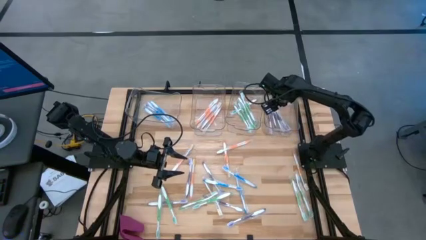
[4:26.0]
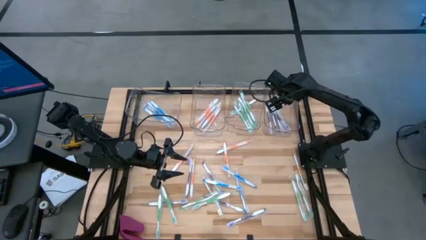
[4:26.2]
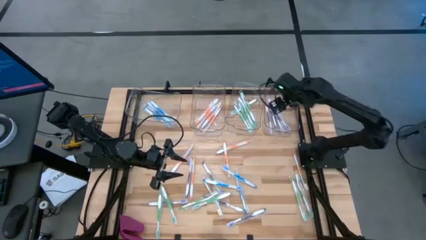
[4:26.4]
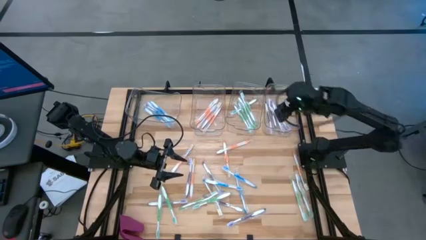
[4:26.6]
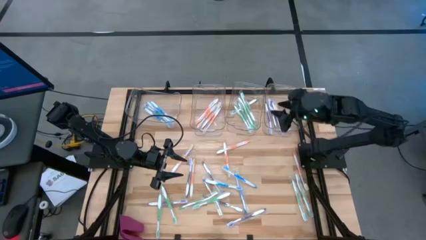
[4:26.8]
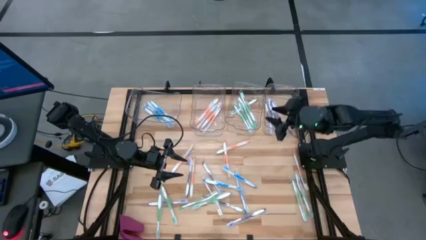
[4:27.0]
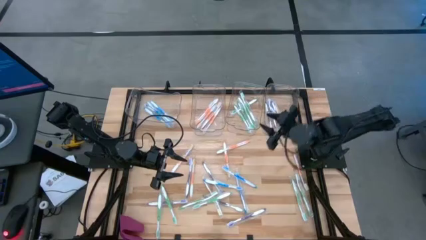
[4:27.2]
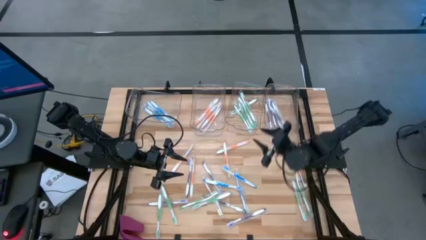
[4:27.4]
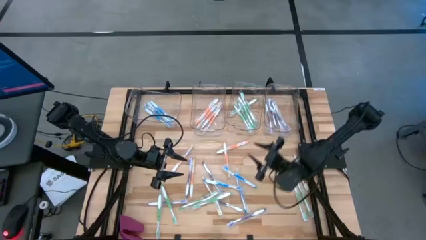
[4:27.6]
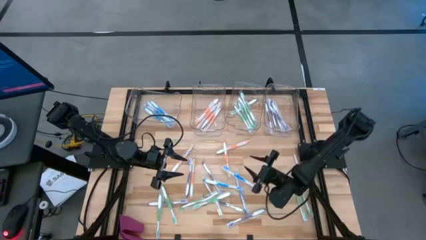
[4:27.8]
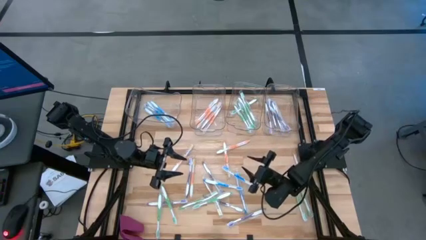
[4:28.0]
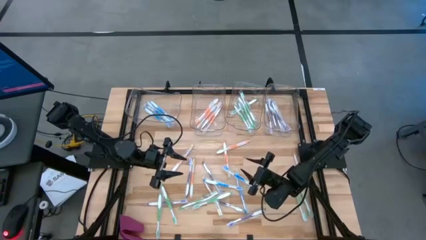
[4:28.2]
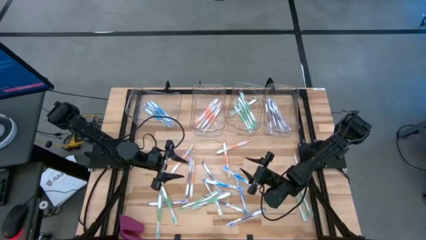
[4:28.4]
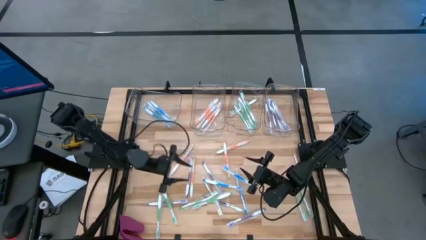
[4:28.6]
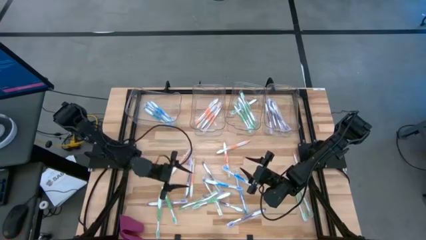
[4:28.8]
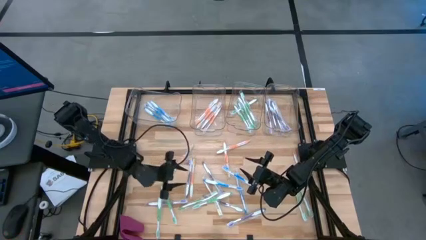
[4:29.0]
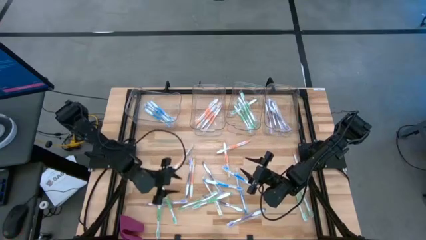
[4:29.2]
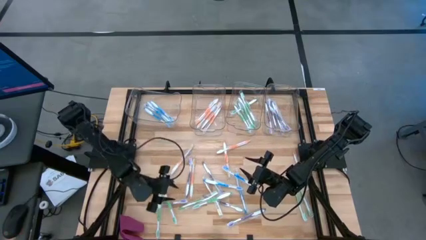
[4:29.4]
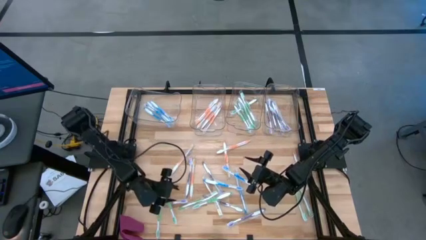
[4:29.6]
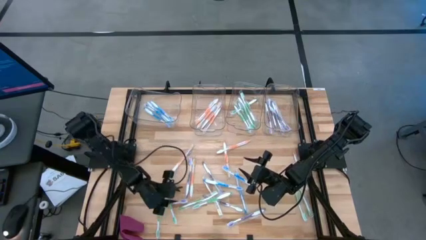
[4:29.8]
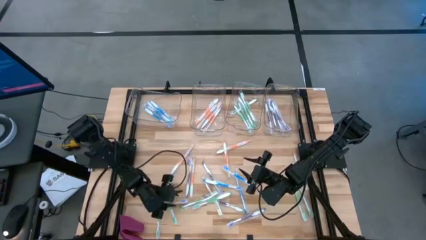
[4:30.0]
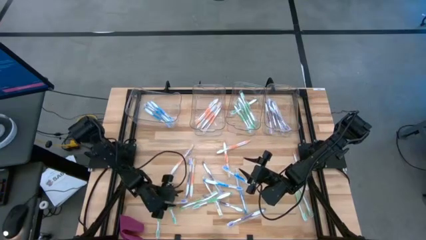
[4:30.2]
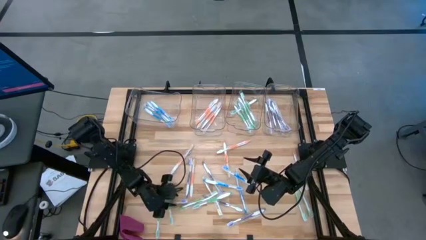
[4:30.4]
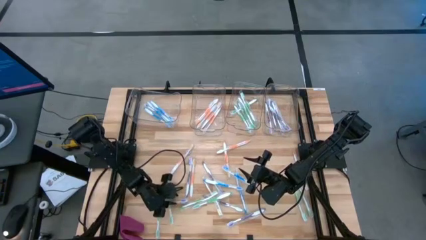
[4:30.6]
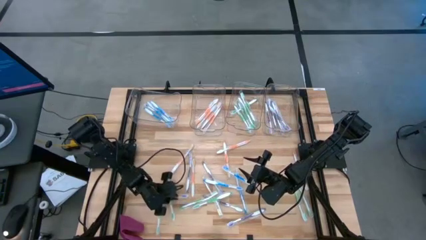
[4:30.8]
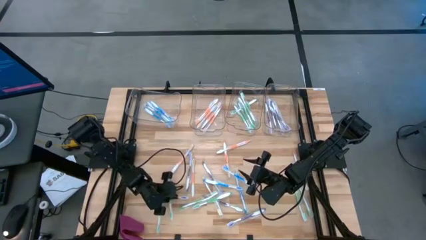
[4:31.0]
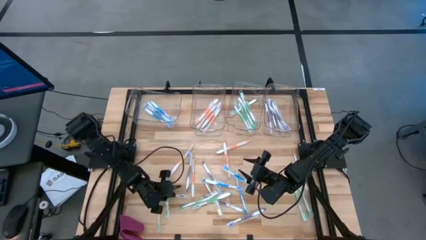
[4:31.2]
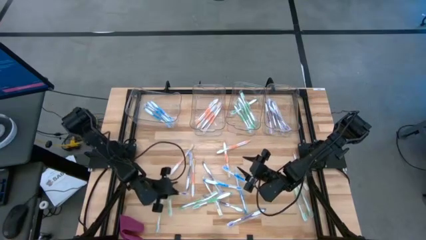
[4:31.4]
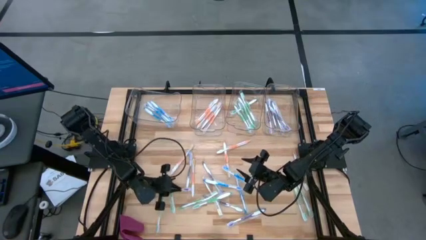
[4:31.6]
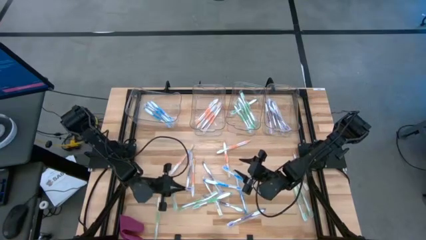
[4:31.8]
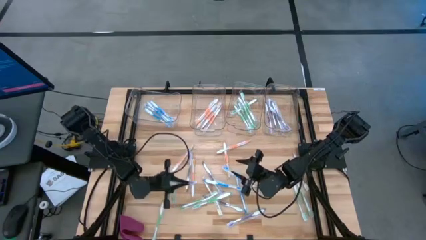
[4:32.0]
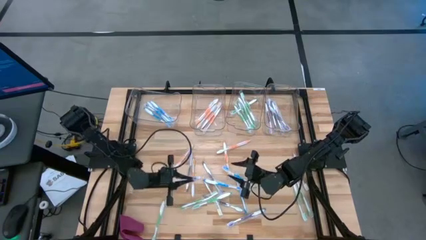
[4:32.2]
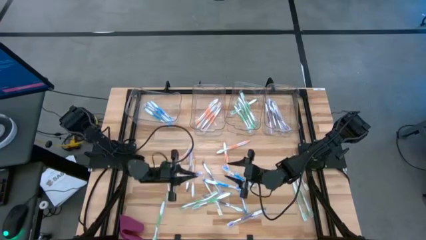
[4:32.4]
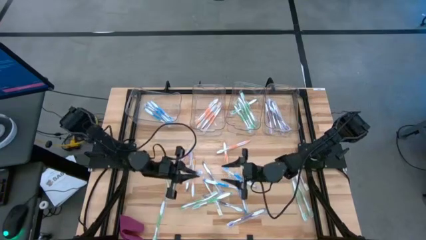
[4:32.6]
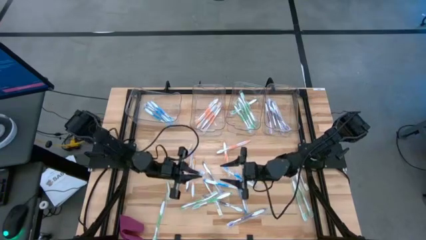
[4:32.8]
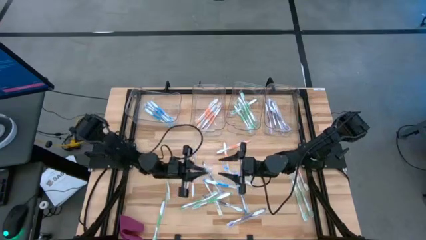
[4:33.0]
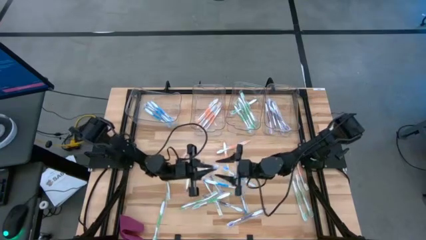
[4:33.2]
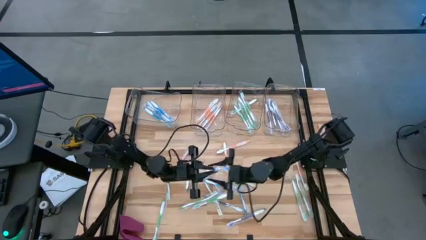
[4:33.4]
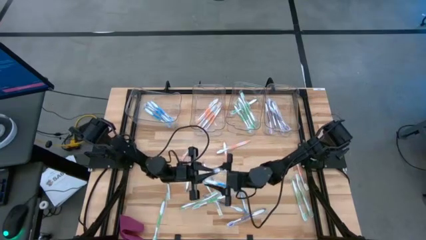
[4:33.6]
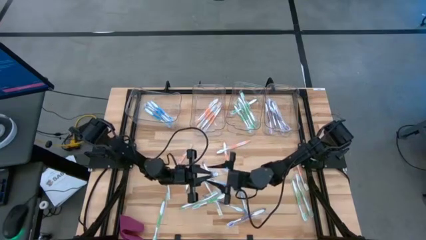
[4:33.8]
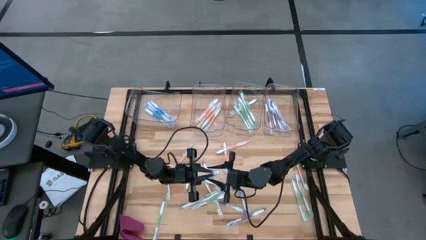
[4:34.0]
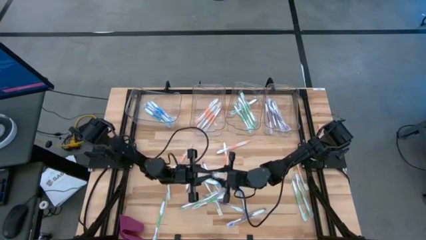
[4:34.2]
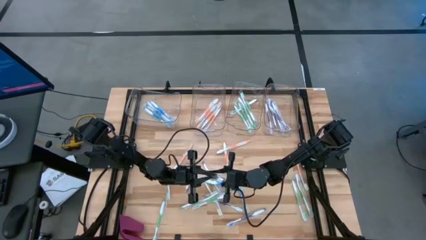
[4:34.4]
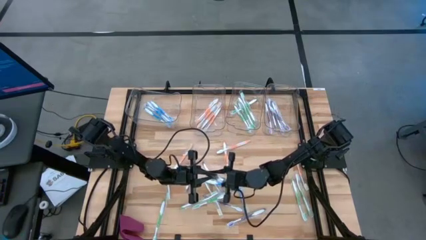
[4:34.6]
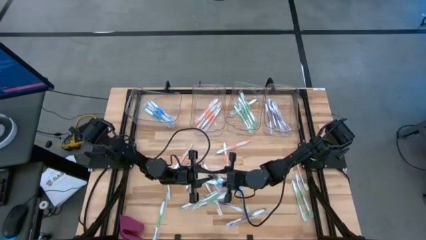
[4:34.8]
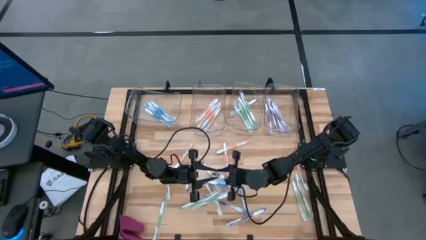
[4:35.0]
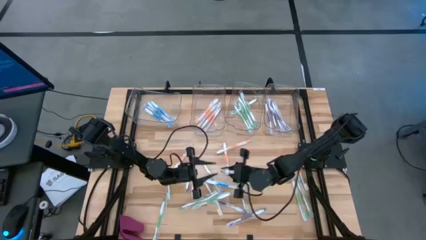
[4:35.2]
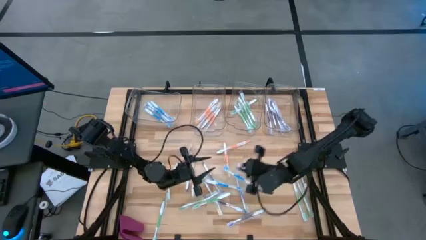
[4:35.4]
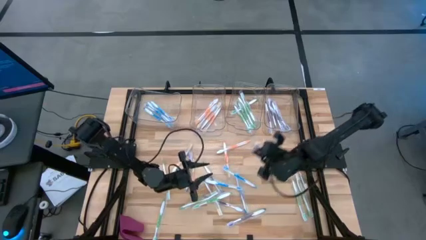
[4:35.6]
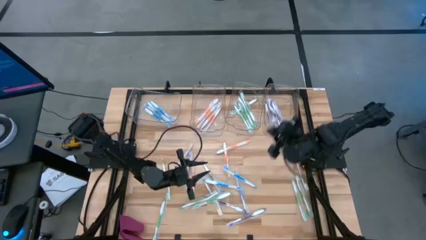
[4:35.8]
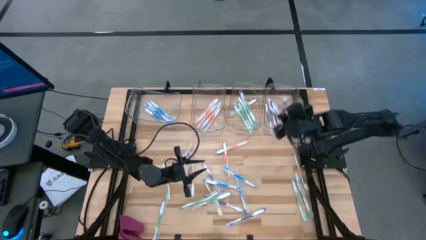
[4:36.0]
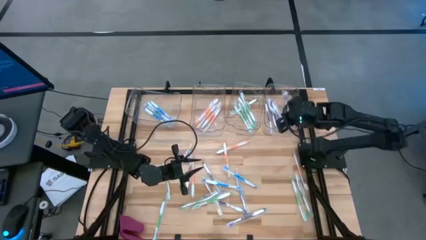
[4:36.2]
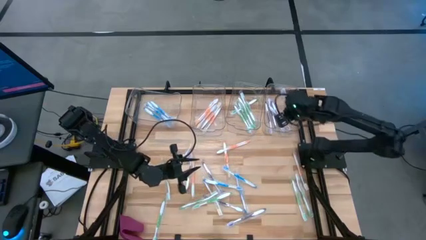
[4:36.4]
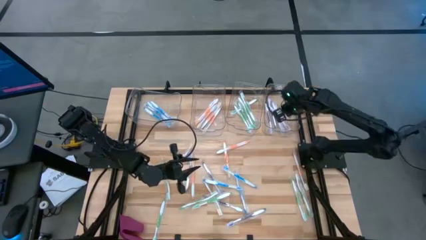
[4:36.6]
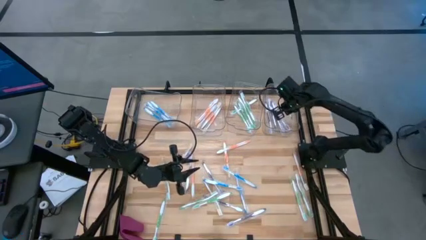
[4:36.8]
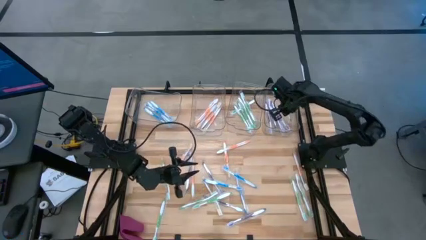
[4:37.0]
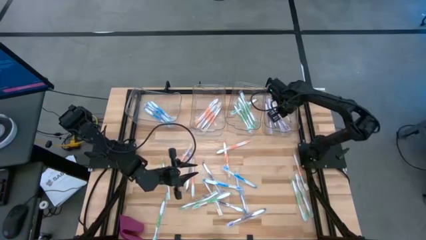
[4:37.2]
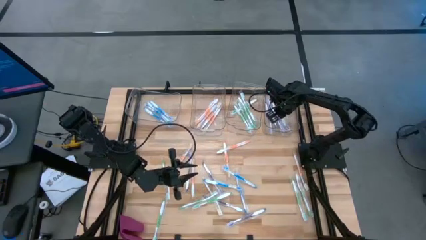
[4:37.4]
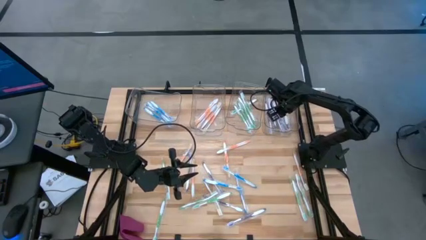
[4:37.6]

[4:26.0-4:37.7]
Task: Pick & Place Toothbrushes
Put the violet toothbrush into the right transparent bin

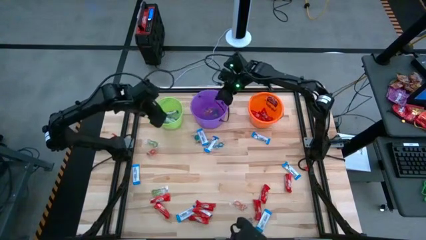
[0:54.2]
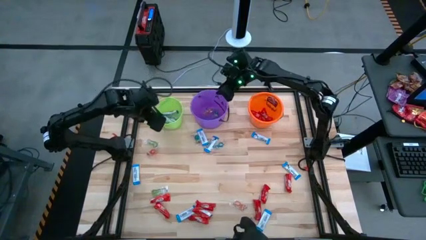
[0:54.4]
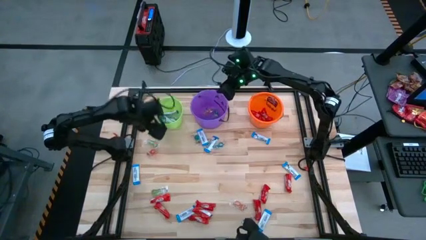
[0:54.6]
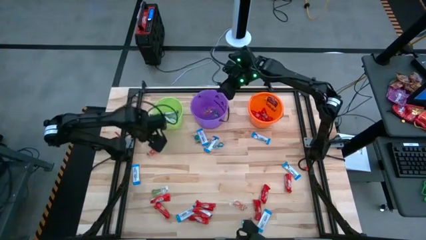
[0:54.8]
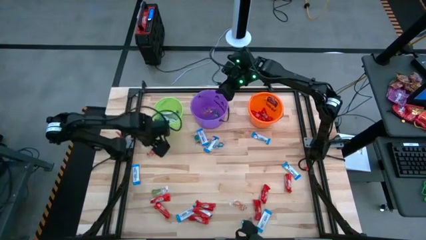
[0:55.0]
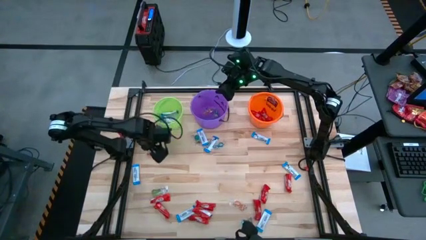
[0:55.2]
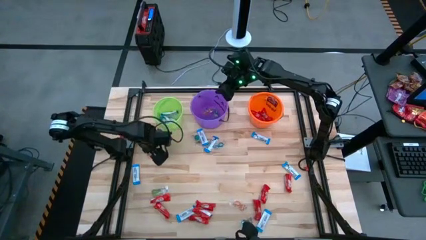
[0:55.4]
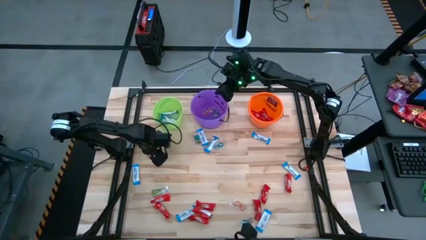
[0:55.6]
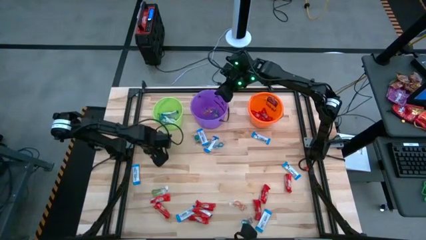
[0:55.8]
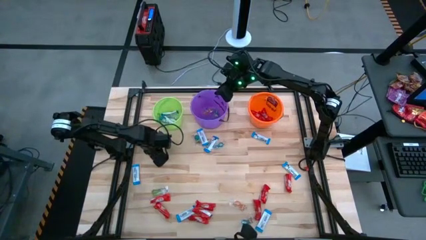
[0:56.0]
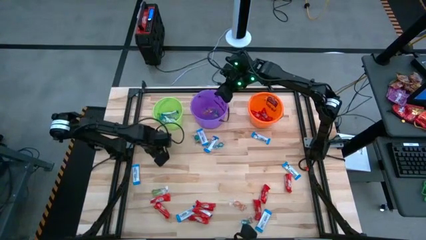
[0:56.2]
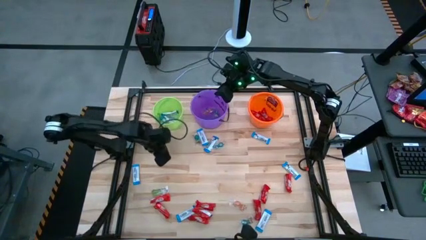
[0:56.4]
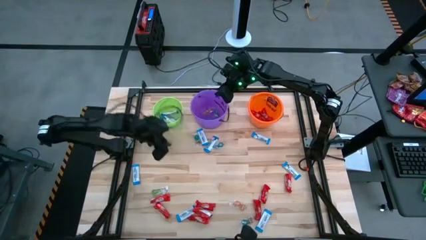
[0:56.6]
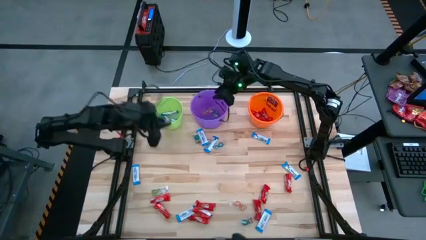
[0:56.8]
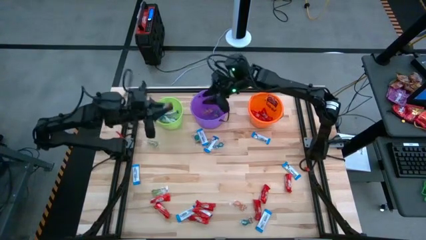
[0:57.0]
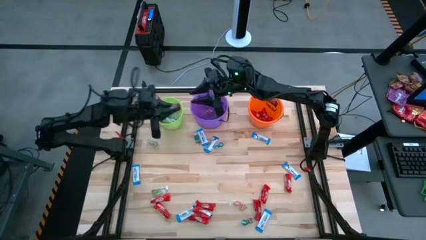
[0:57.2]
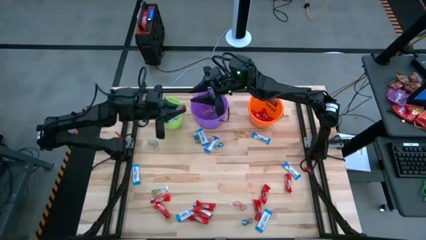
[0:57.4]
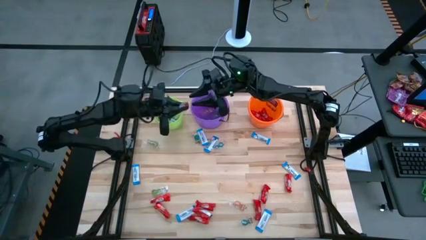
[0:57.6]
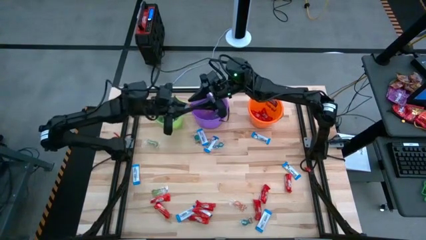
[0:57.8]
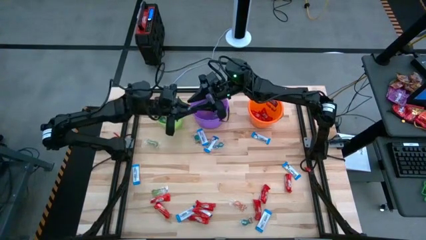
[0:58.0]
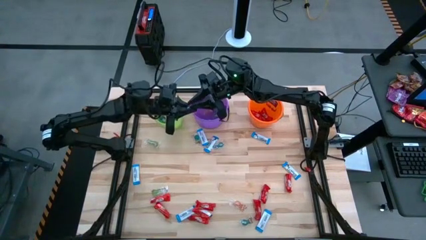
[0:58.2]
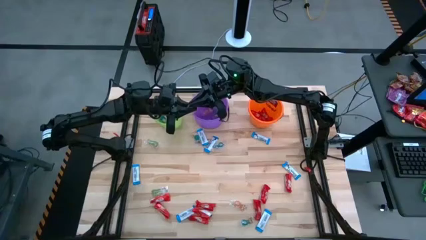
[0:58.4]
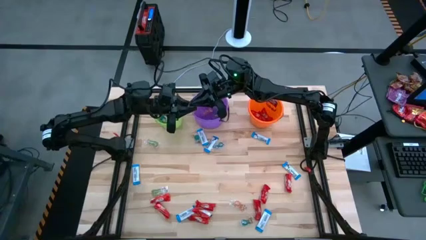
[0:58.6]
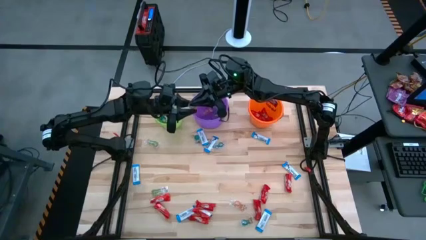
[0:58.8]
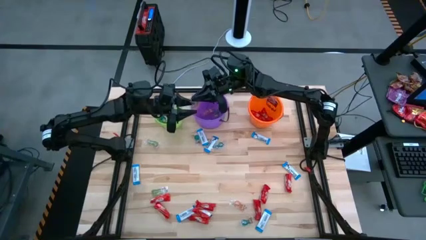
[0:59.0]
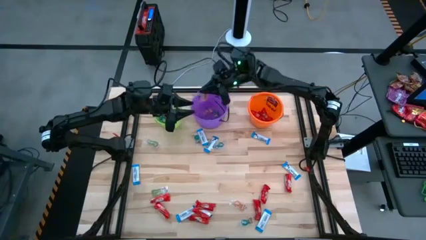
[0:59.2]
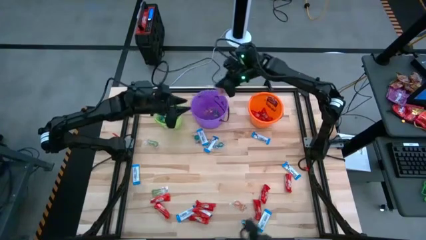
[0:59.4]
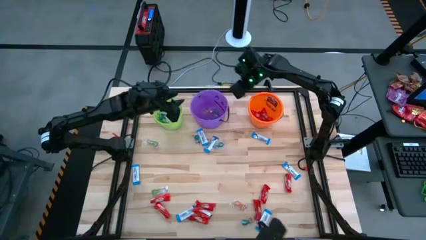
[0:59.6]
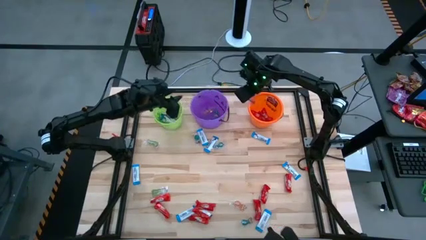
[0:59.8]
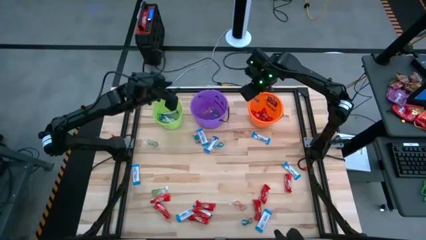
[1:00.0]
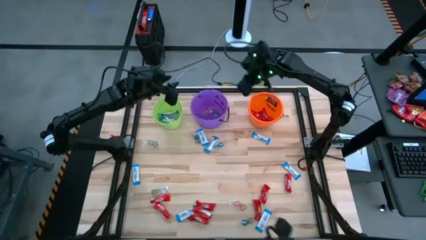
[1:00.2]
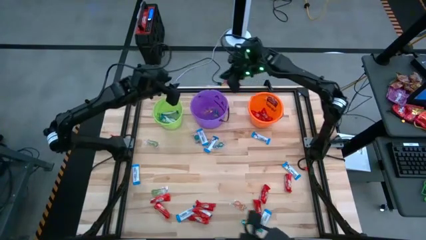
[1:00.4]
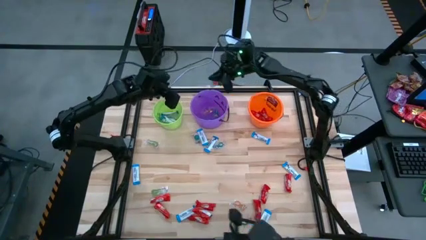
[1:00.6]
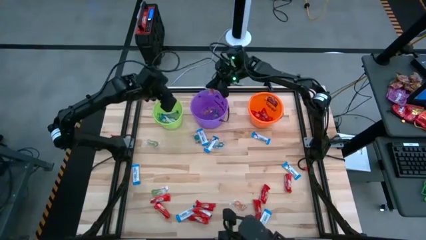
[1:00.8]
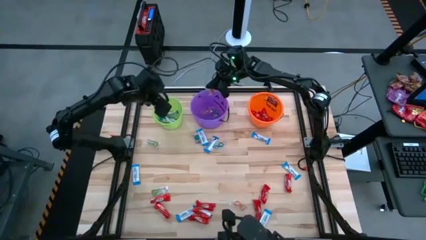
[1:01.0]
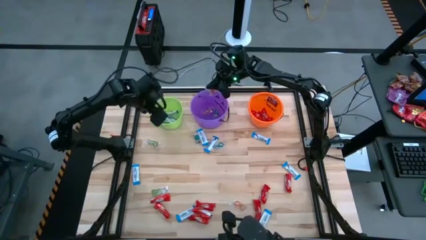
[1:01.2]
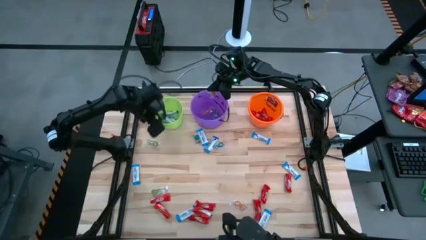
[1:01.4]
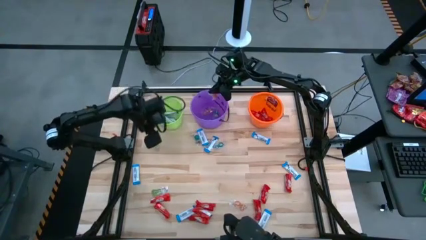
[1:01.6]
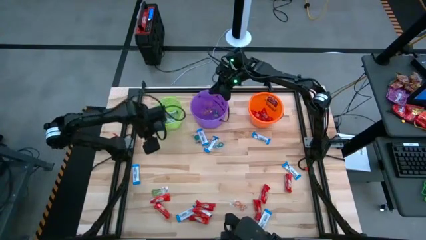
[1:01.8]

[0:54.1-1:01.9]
Task: Sort candy by brand, put in halloween buckets
Put the orange gummy into the purple bucket
